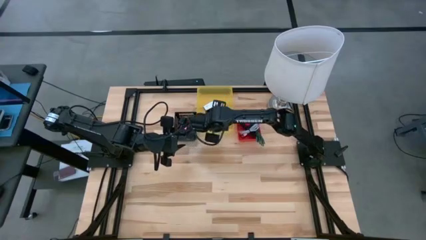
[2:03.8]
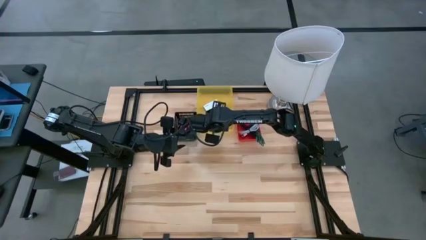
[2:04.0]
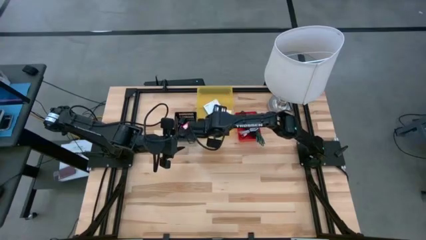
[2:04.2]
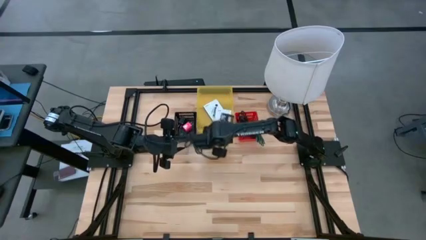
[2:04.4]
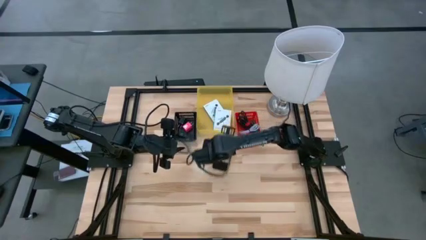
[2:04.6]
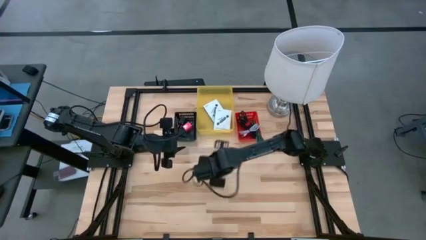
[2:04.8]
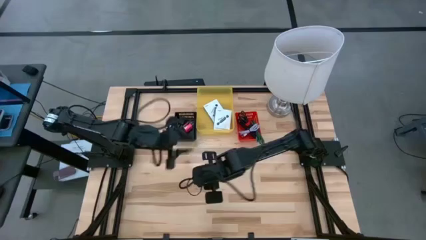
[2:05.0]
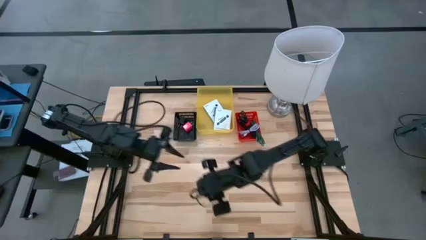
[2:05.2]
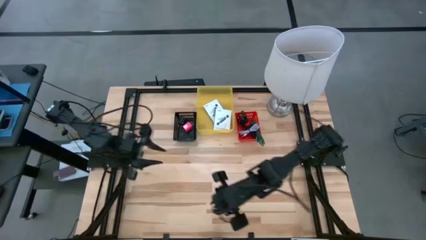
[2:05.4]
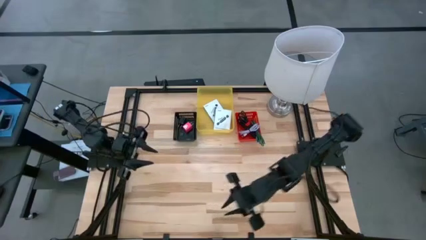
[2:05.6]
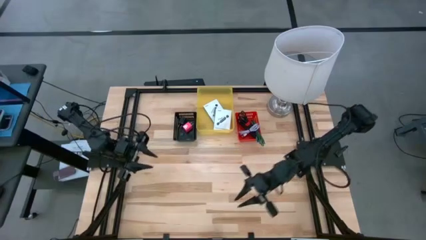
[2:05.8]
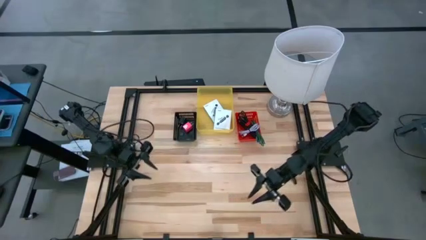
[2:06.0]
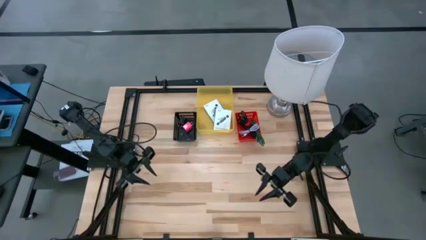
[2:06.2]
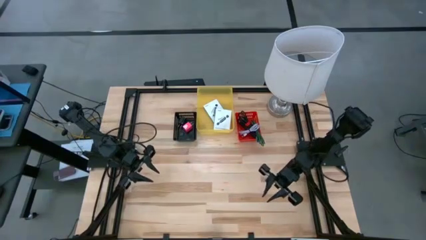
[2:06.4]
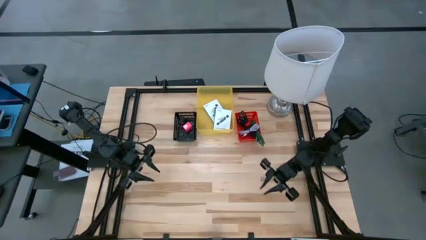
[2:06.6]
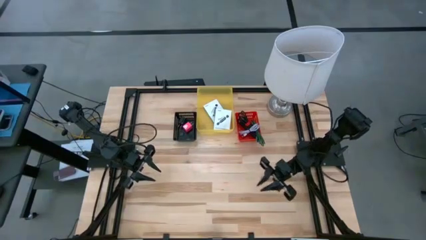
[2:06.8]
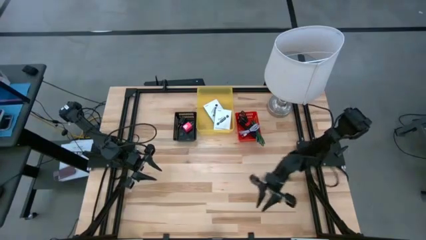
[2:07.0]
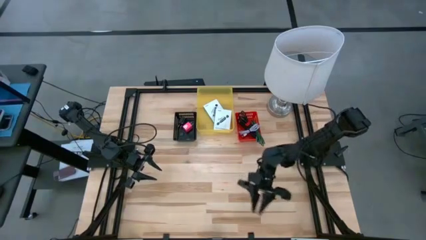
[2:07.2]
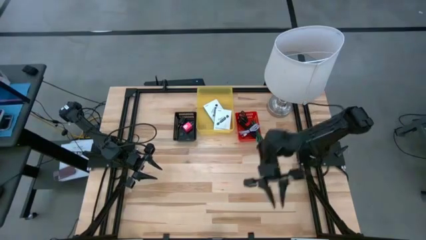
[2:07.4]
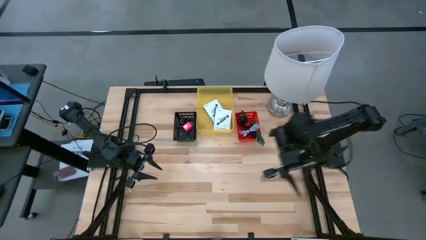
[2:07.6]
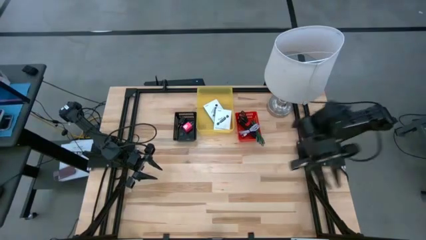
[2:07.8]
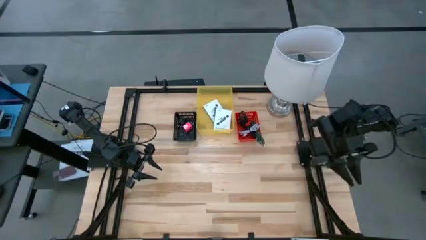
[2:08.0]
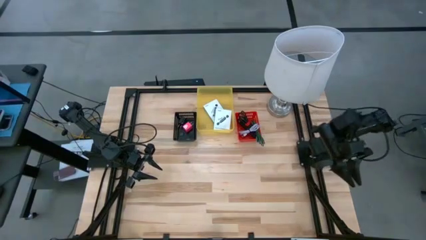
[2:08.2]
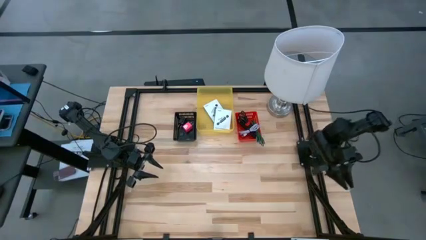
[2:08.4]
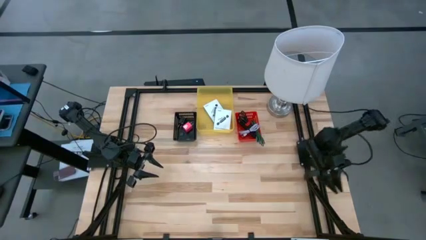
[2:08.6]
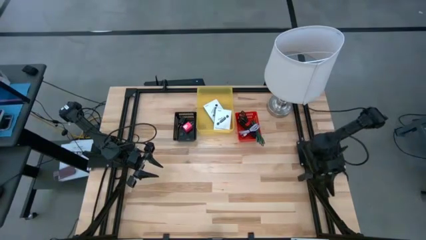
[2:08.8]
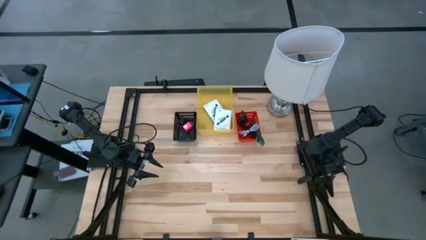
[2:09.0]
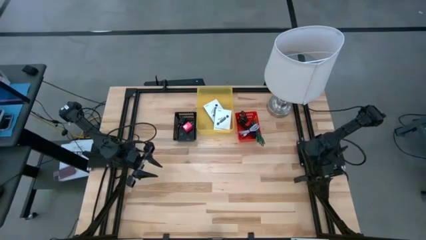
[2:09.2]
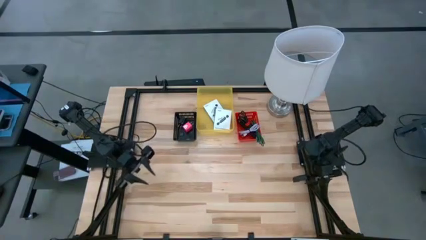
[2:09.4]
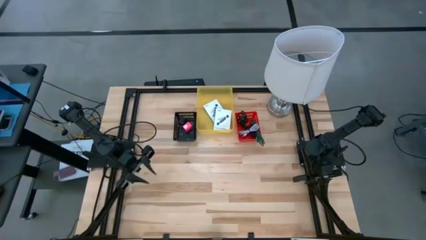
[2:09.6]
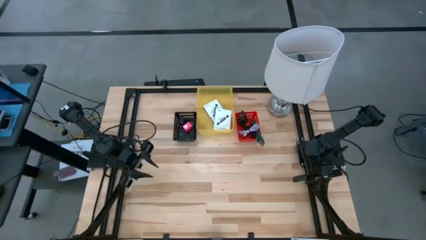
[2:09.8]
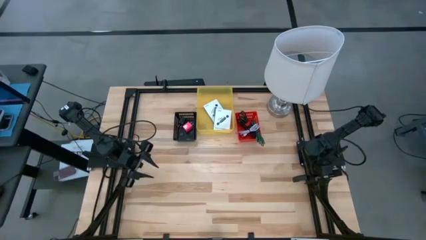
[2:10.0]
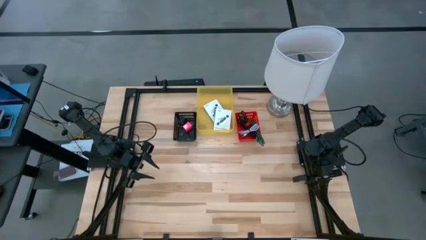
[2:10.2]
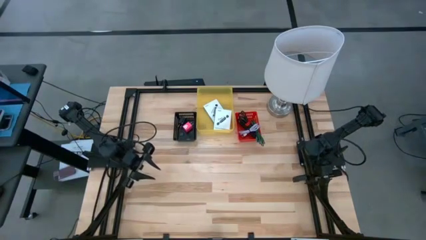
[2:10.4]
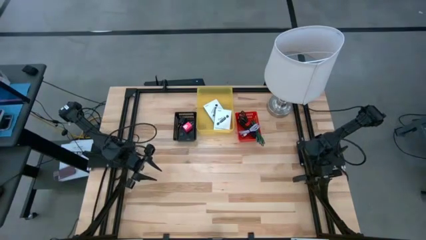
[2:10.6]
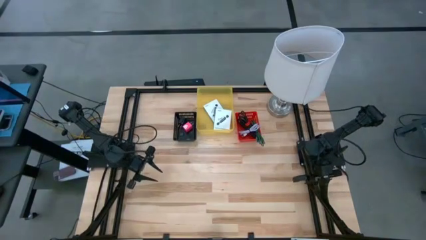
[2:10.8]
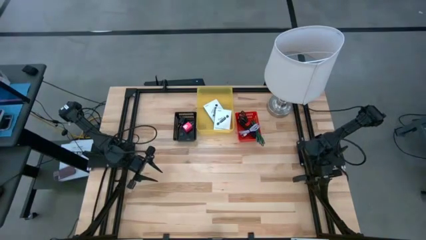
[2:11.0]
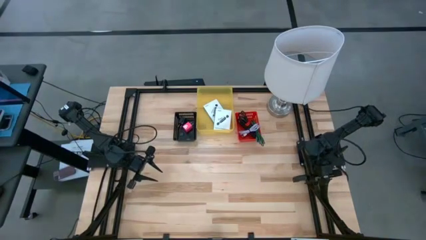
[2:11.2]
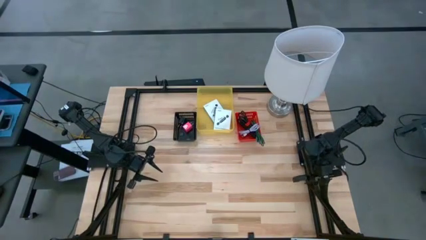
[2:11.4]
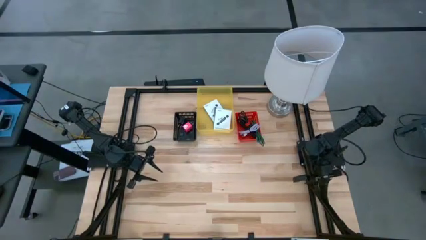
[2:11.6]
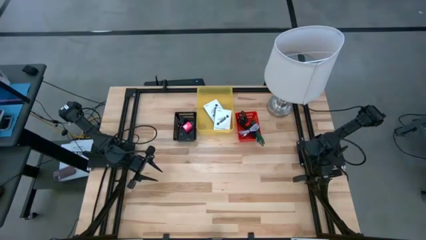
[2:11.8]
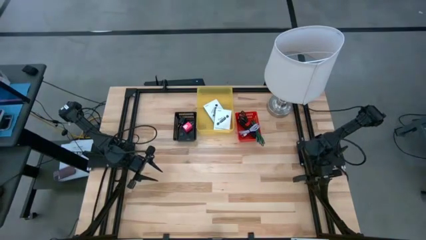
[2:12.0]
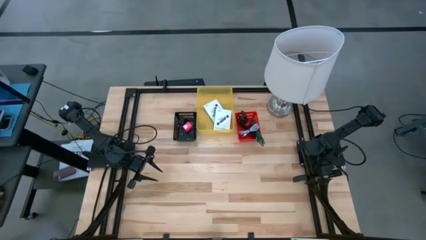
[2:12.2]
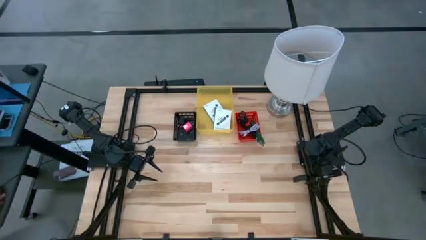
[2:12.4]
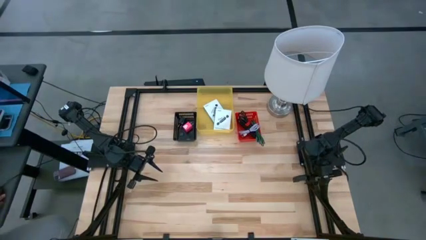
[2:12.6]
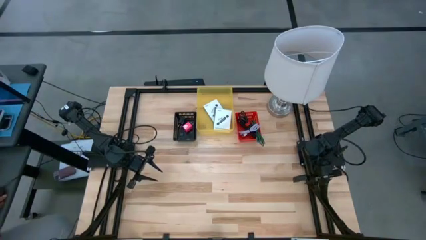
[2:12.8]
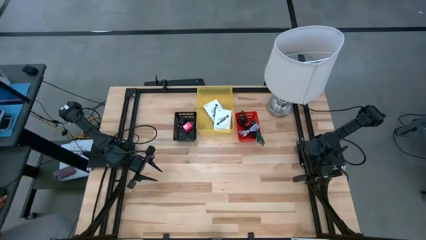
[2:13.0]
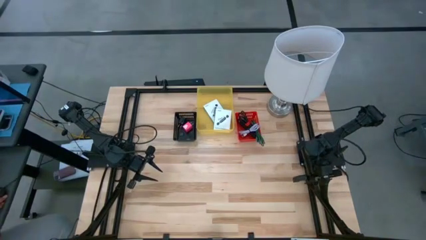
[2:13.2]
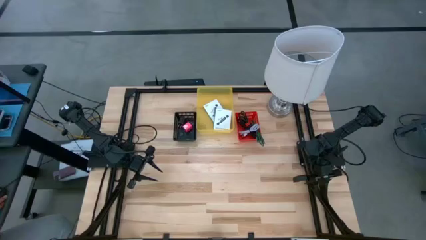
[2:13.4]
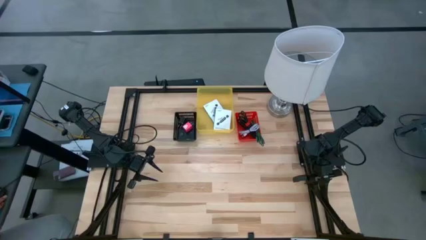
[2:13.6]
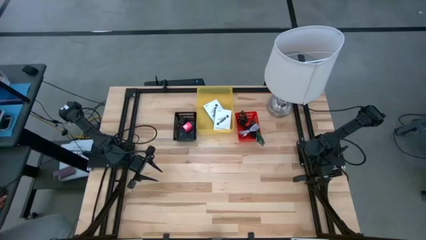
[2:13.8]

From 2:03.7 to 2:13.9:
Task: Pick and place items into bin
Return to Home Position

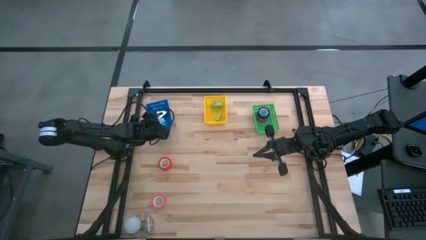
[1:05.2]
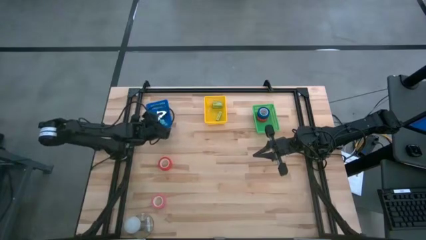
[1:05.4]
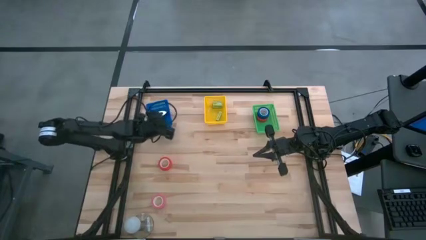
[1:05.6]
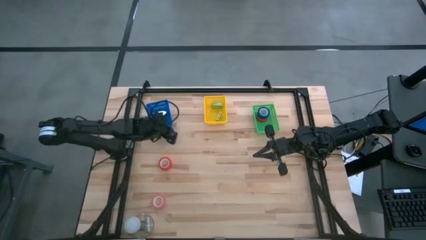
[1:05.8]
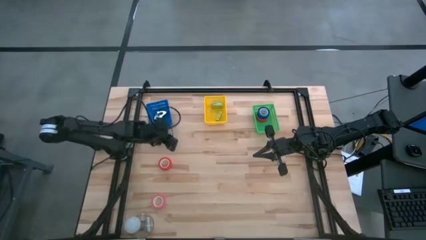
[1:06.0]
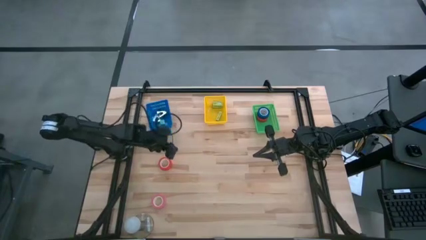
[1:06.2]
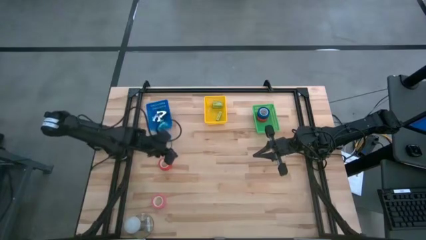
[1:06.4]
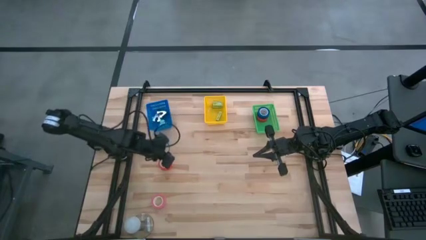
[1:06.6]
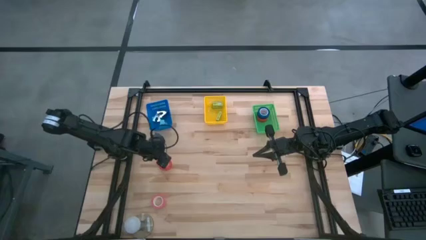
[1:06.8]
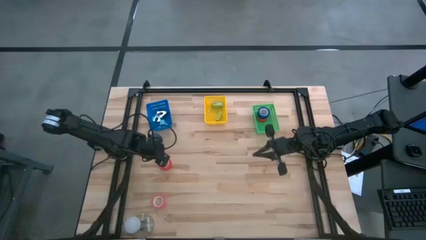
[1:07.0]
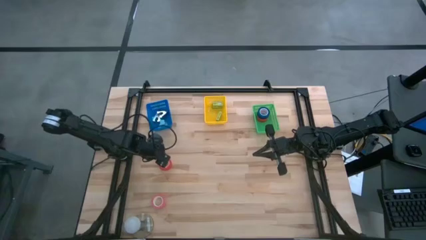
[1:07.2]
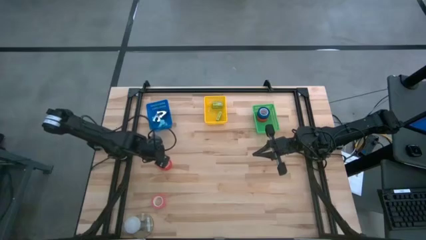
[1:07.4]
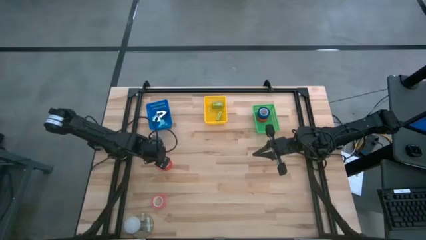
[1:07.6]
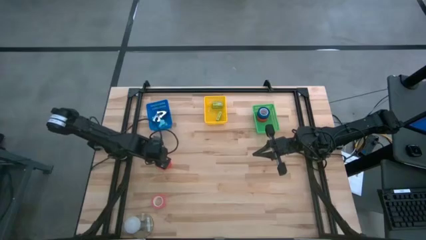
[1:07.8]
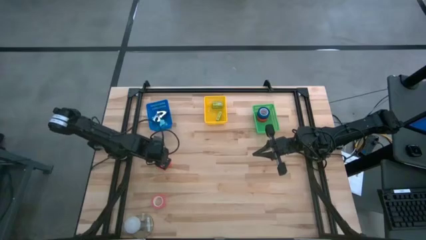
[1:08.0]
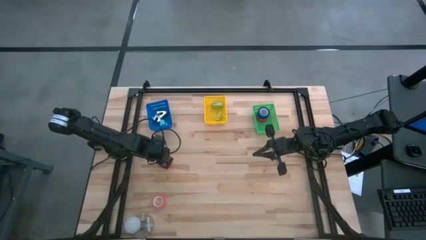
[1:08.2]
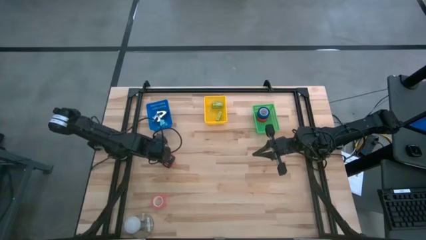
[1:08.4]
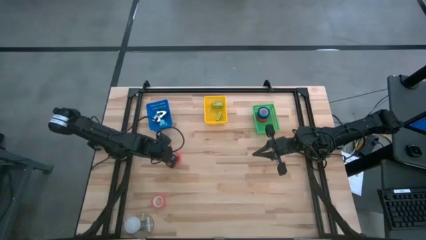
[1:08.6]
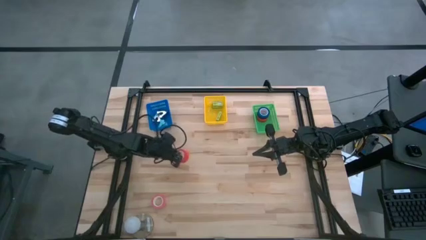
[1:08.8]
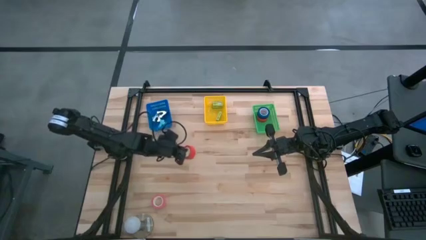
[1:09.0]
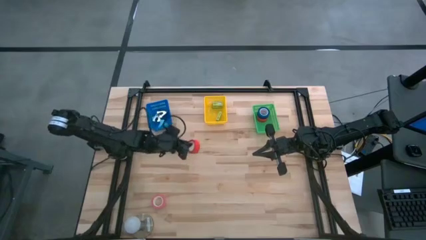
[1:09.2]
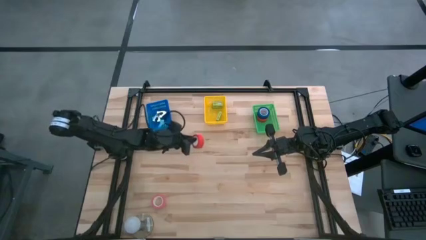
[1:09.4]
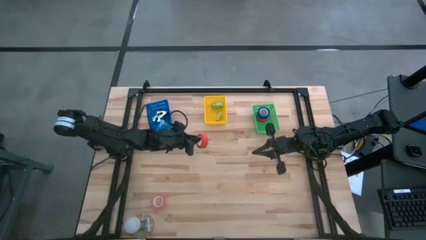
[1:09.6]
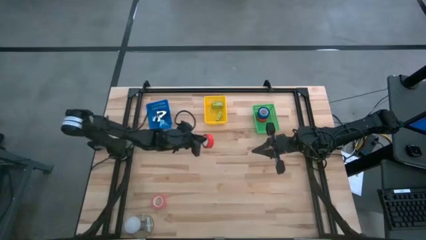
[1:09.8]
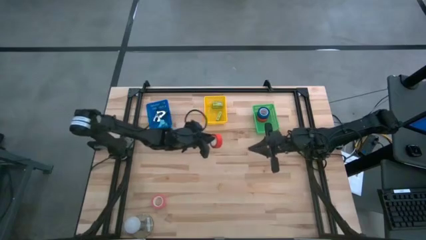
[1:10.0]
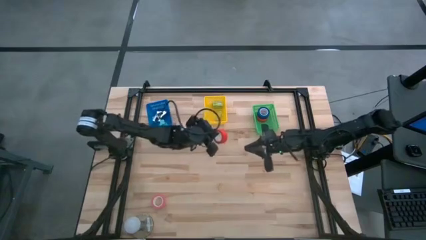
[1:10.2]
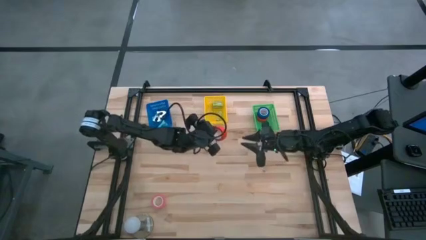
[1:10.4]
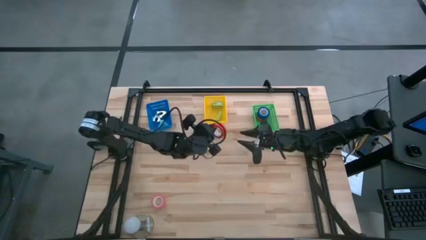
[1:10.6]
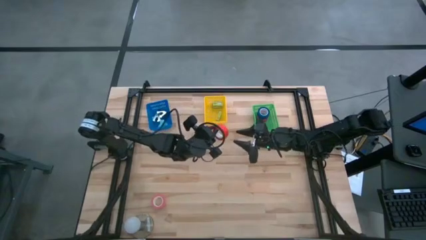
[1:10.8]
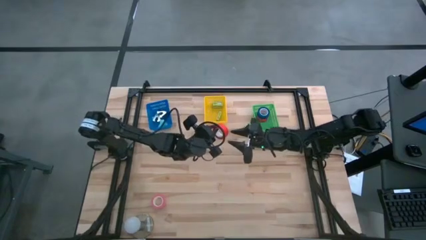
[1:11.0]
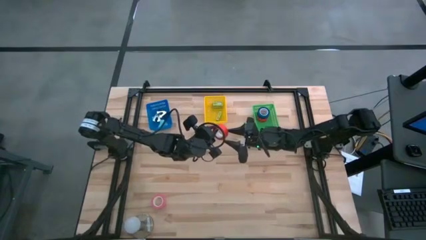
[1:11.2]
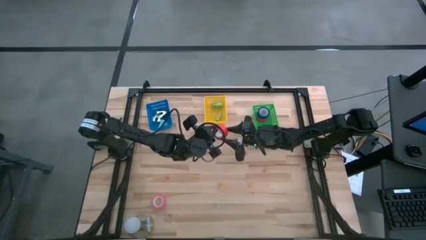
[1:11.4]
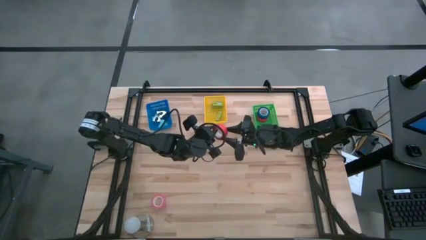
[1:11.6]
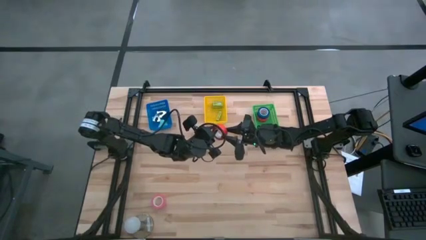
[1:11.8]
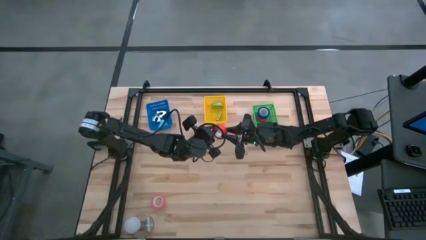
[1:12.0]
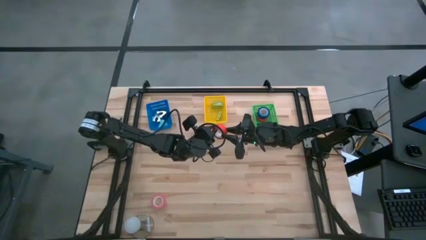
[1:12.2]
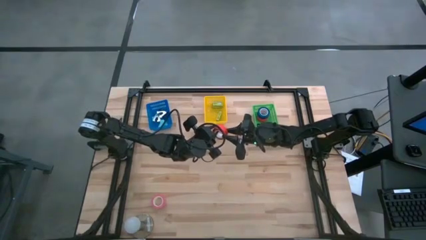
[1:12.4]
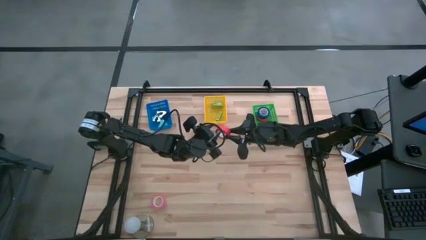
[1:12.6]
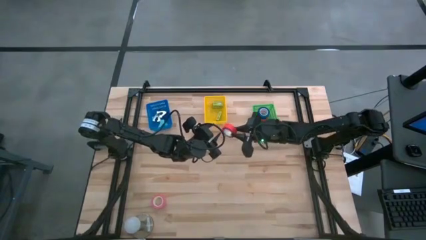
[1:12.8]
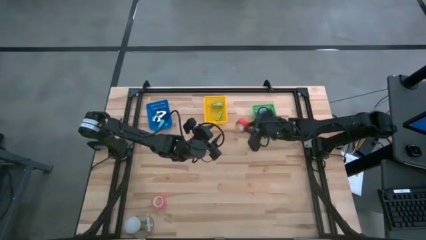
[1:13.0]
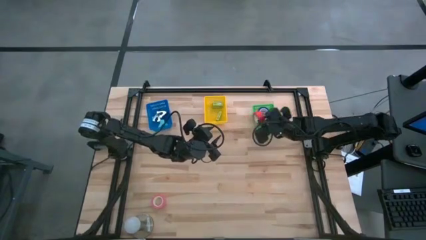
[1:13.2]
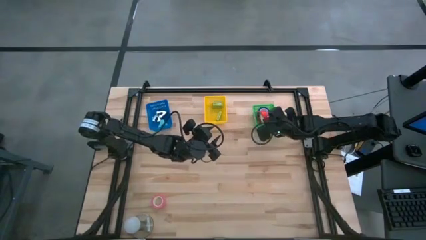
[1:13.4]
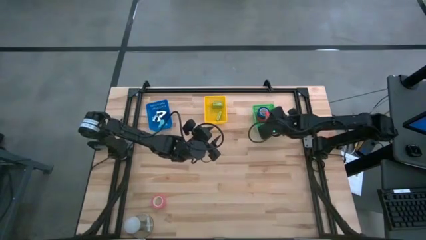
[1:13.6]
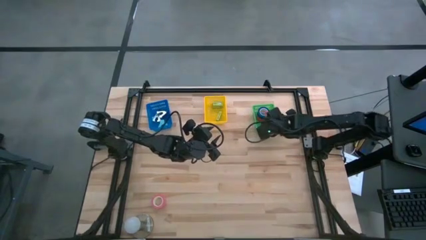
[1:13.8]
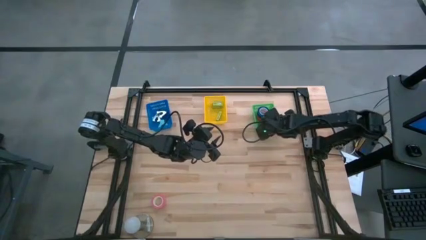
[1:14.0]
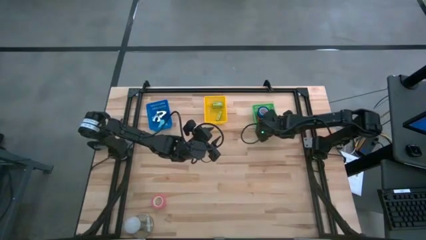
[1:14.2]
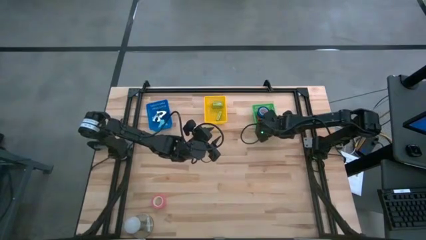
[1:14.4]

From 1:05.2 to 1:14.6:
Task: Pick and place Stapler, Stapler remover, tape
Put the red tape into the green bin
